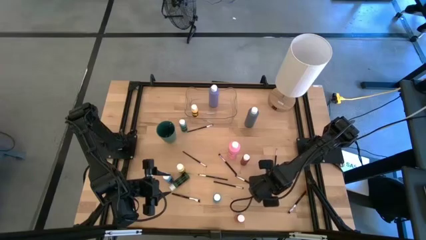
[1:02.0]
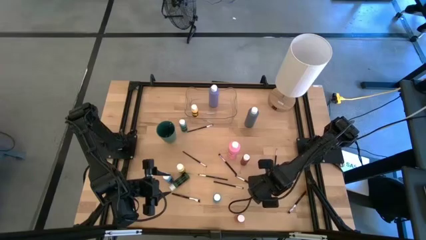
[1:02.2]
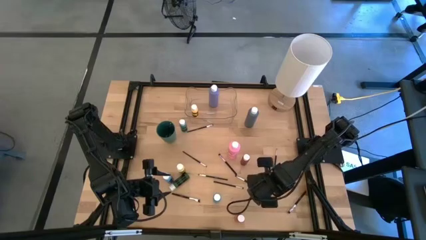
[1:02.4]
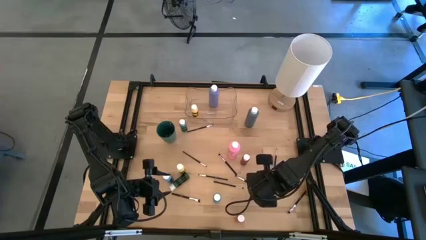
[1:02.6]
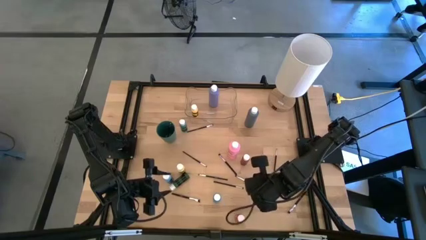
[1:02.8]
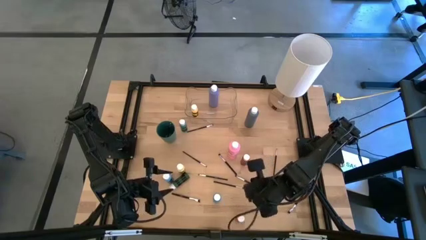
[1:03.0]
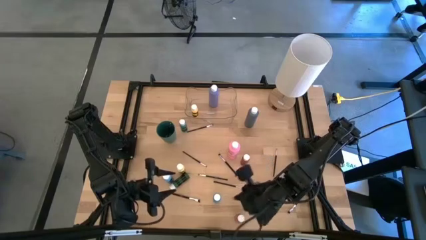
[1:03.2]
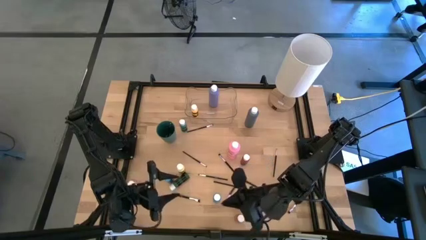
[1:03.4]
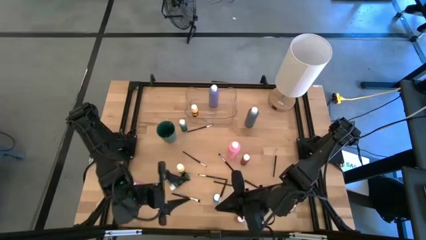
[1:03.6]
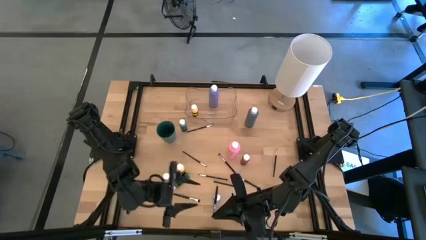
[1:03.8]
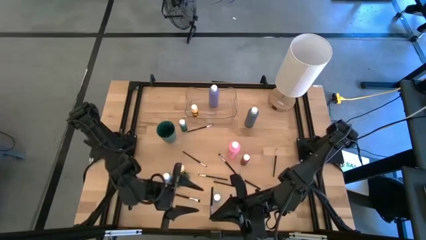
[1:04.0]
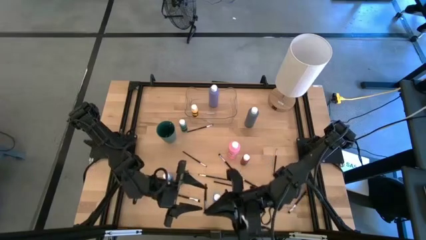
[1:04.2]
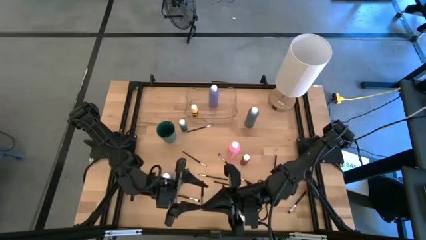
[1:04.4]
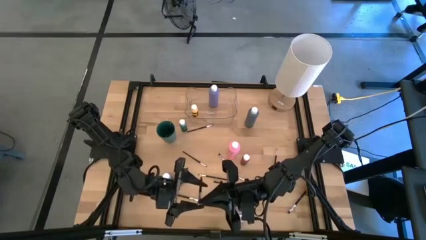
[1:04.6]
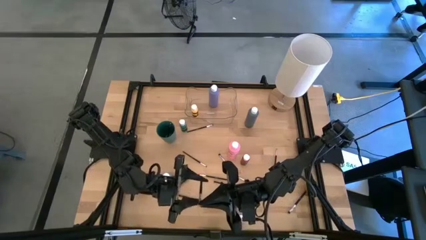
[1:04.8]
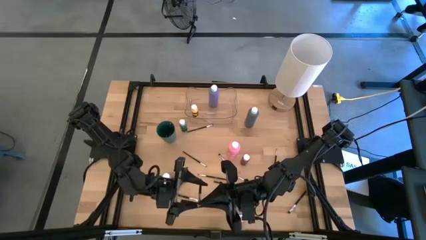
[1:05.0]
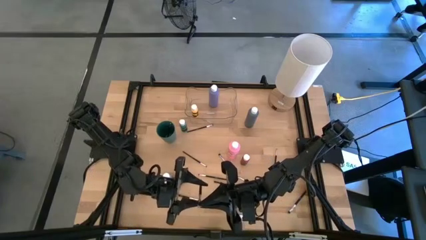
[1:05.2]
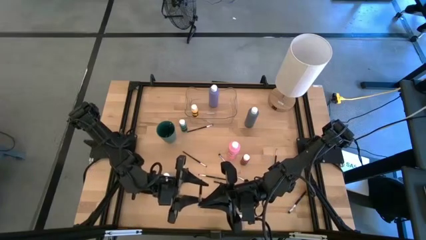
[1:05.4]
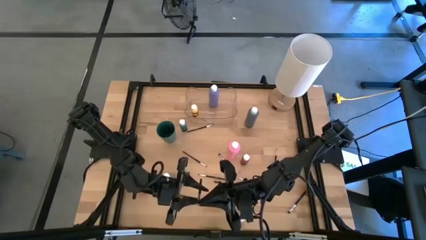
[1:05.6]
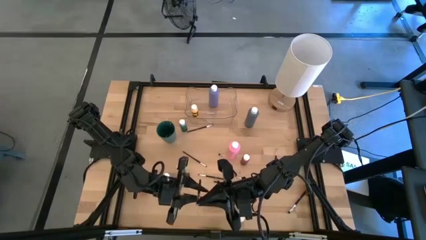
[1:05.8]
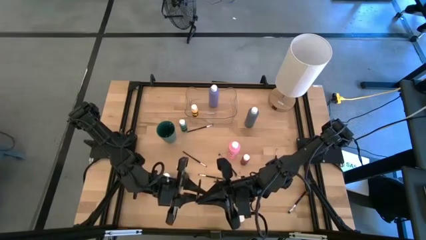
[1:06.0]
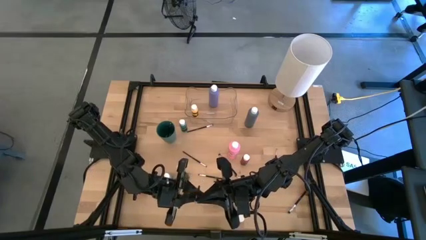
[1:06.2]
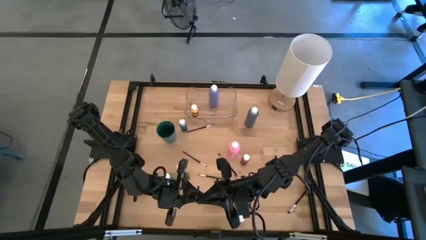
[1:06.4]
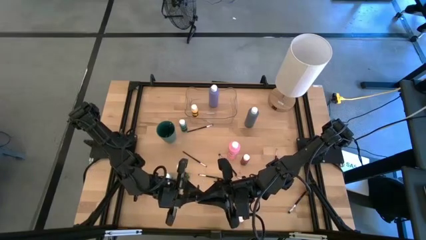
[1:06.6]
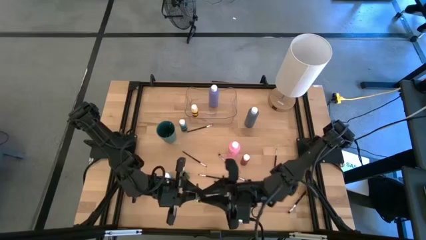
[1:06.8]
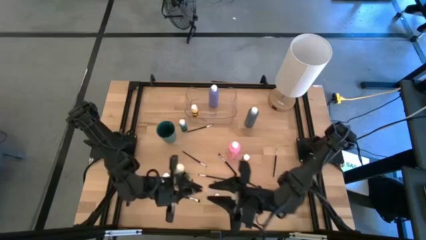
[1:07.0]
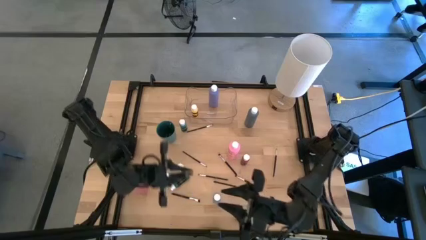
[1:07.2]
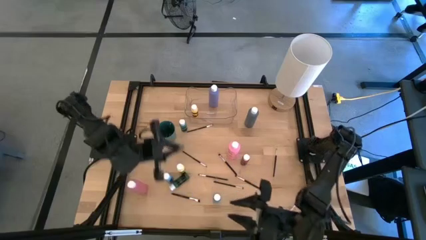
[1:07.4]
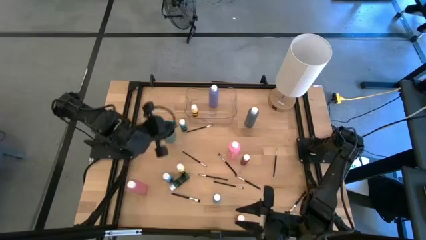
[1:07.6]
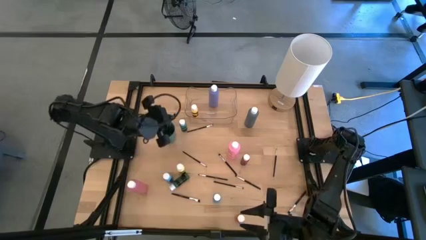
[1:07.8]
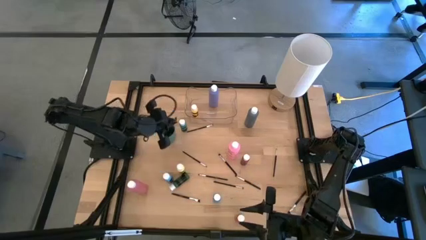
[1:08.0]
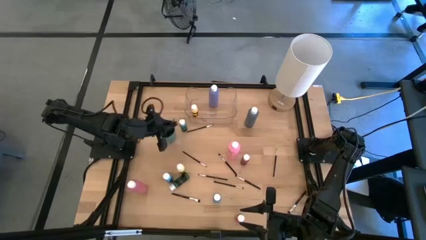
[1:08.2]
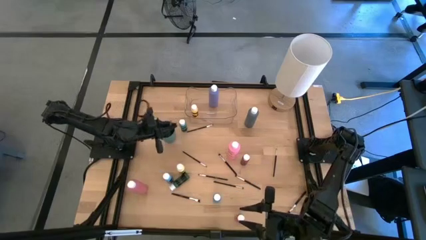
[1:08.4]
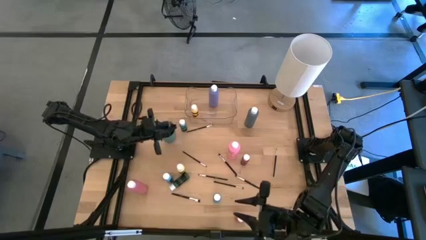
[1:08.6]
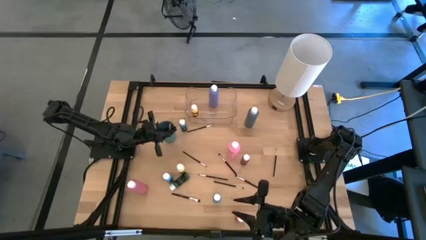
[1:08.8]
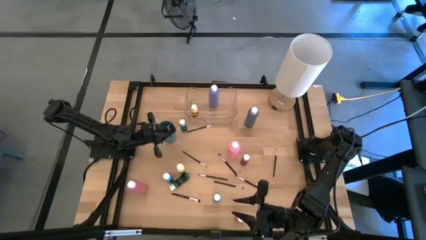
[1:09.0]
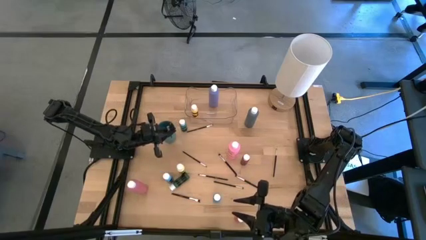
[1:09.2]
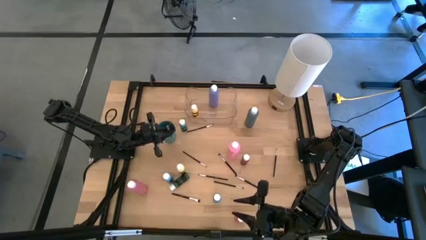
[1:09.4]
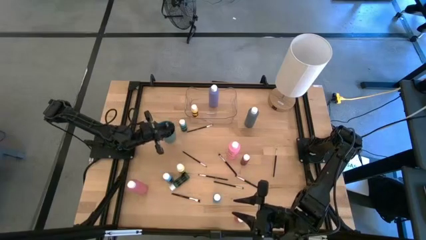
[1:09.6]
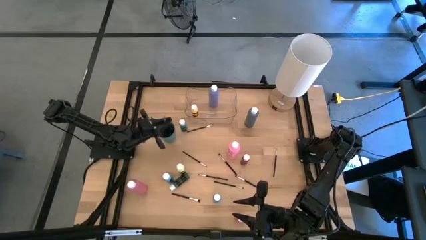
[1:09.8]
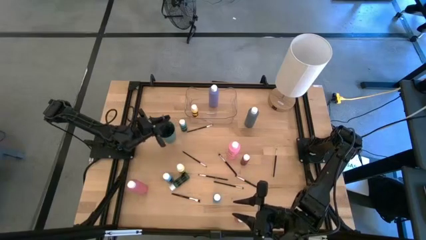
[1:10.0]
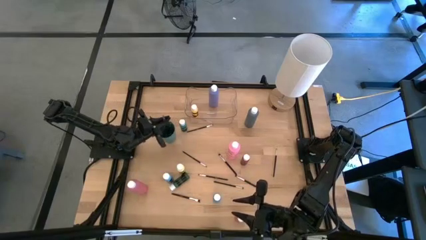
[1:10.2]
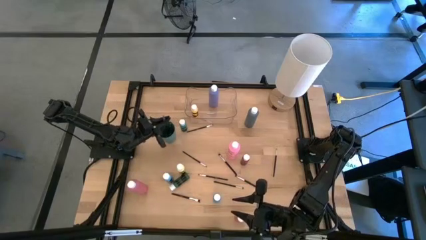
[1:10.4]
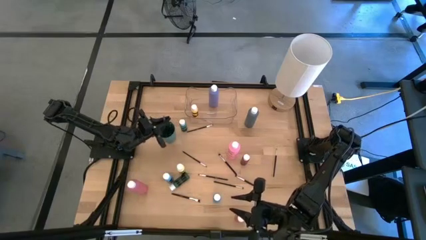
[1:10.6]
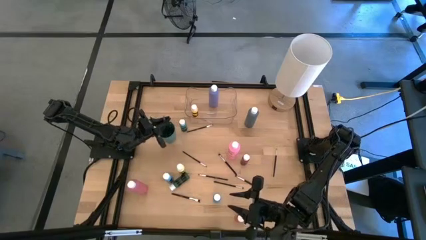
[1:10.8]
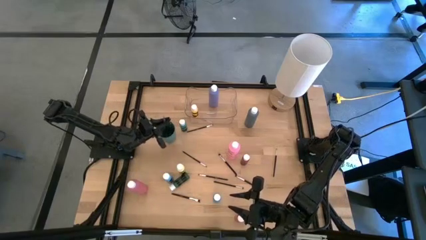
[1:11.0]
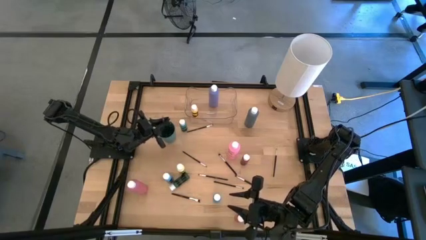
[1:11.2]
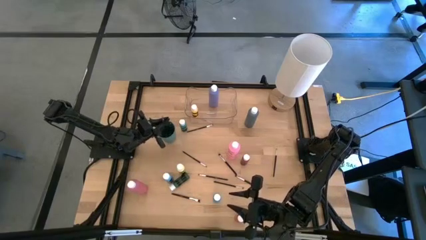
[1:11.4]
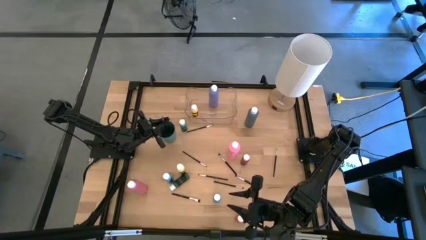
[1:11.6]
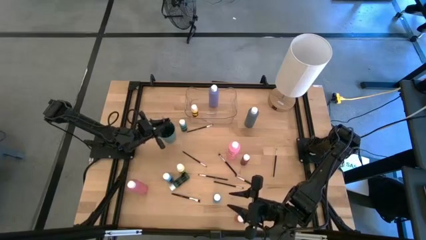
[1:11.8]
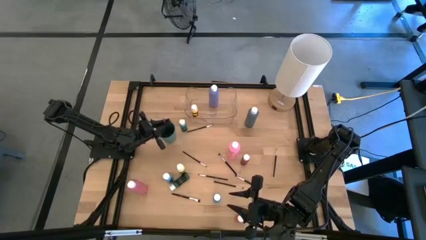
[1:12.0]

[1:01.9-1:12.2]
Task: Pick & Place Paint Supplies
Put the black paint brush into the green cup

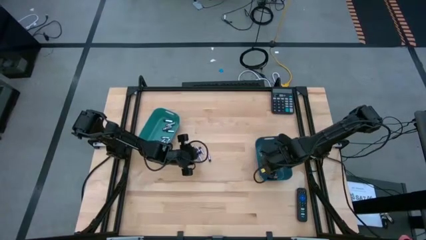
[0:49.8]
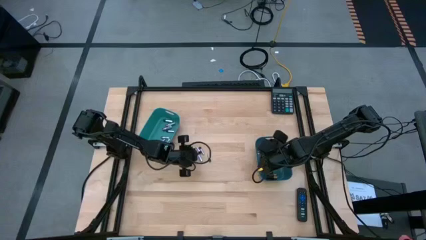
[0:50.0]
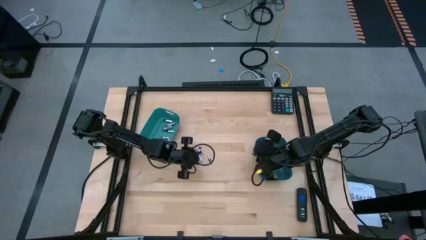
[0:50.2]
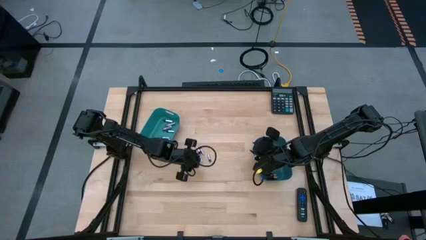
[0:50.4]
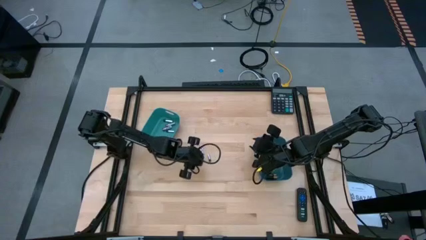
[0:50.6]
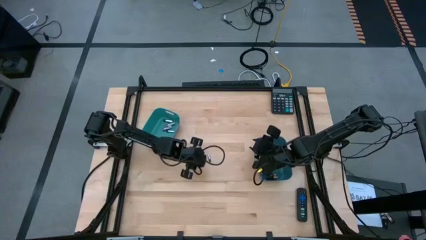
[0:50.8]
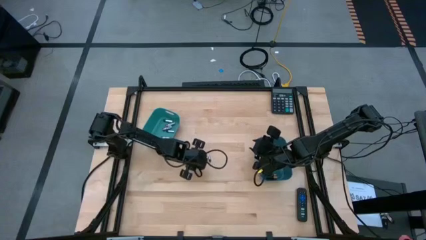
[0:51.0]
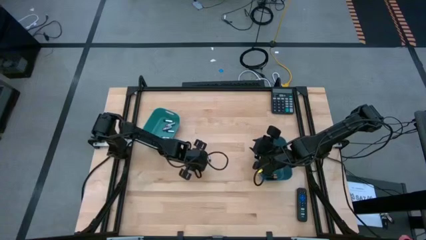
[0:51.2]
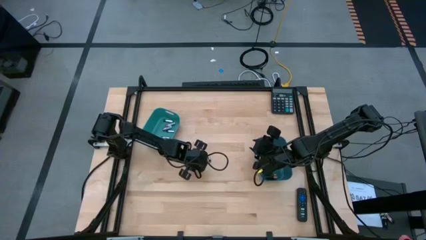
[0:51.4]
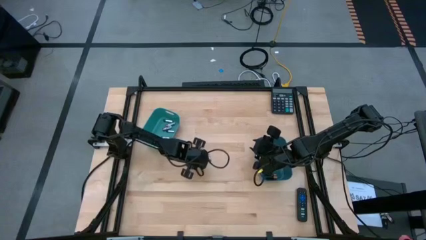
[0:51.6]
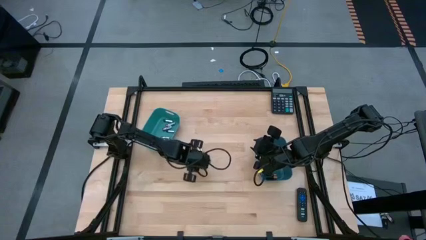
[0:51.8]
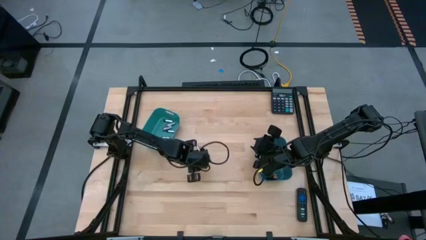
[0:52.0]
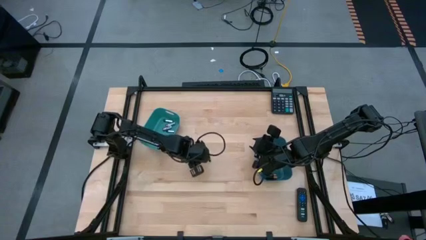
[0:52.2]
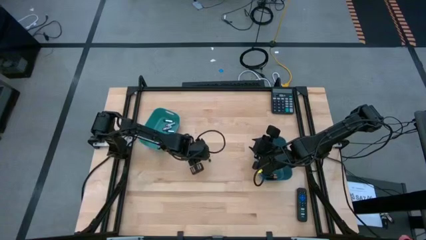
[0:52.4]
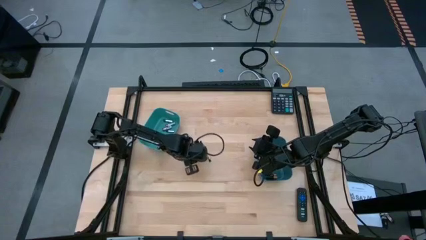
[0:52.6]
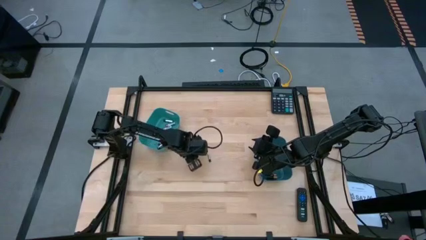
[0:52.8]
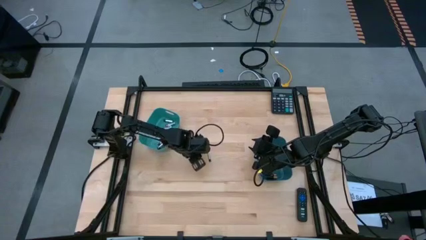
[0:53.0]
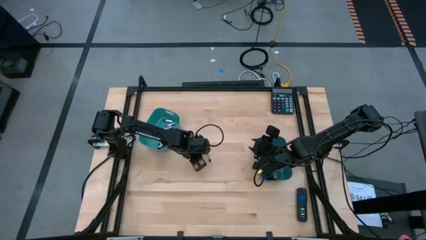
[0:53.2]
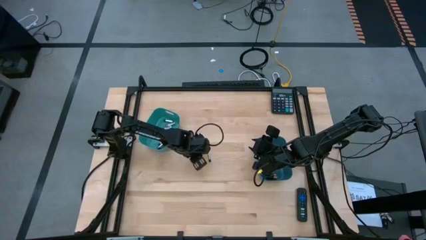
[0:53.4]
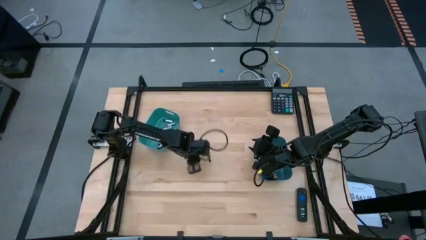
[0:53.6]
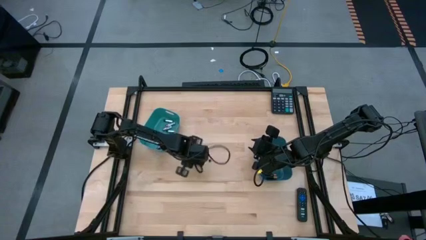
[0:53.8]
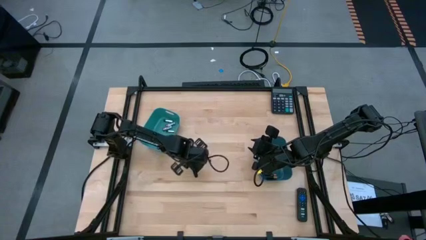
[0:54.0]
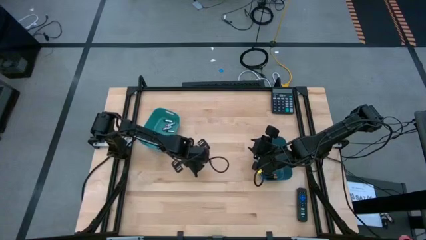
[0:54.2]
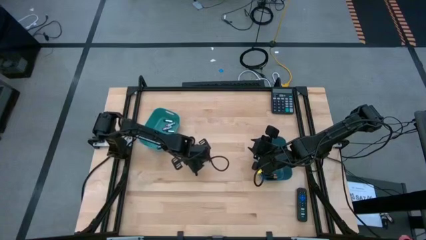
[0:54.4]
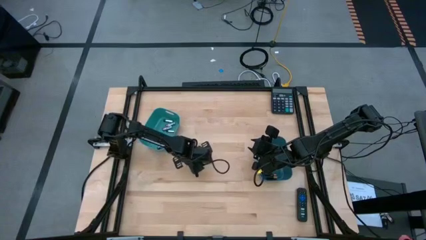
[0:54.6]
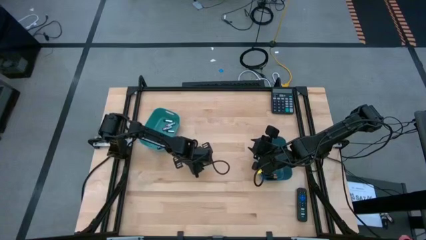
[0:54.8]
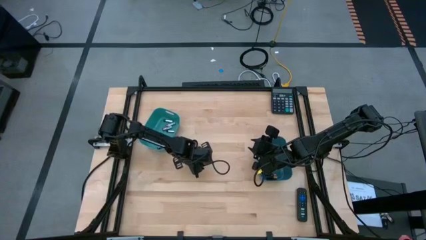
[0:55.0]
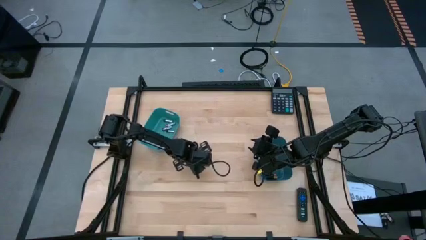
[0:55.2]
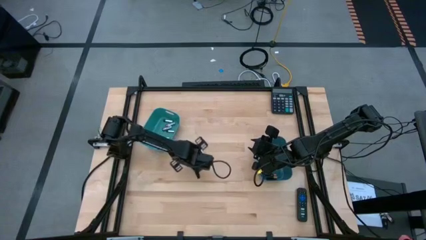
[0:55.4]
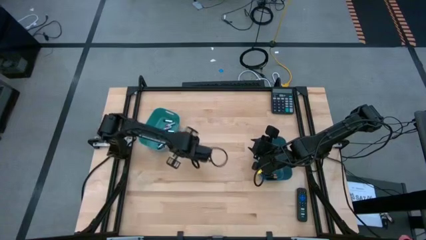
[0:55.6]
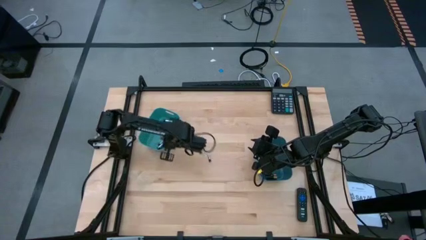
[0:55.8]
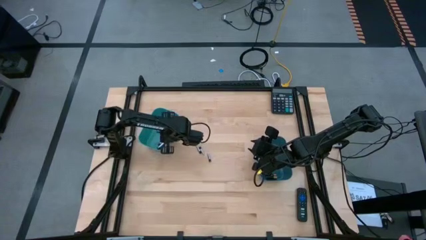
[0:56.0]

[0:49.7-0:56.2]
Task: Sort batteries
Put the silver battery into the green bin

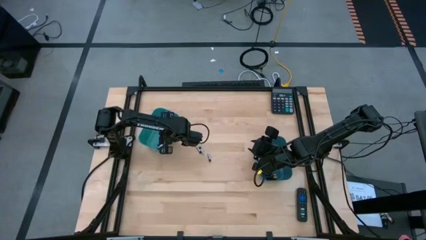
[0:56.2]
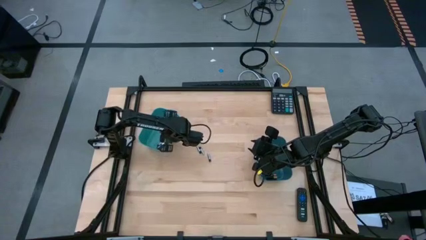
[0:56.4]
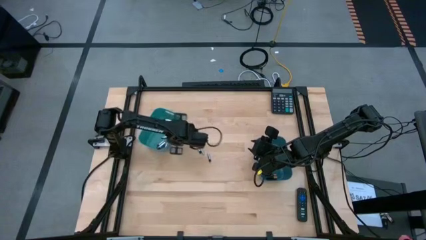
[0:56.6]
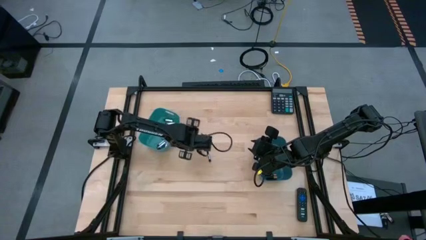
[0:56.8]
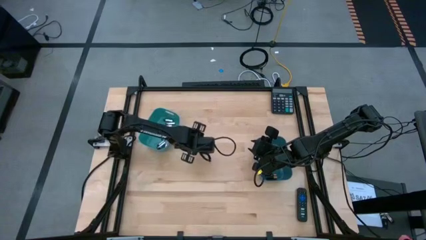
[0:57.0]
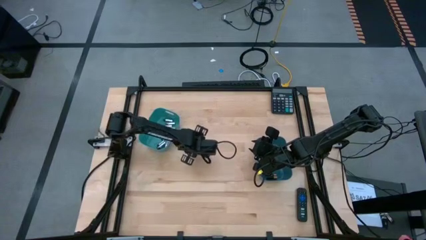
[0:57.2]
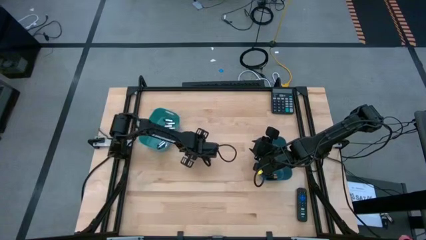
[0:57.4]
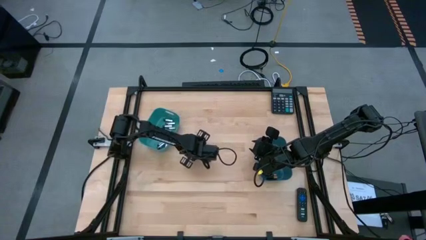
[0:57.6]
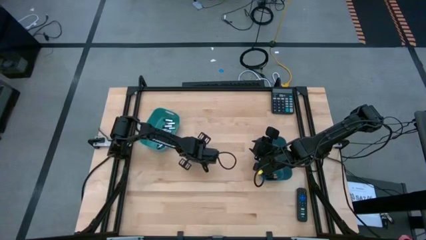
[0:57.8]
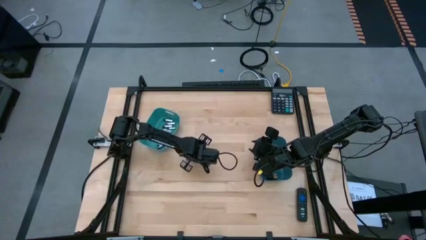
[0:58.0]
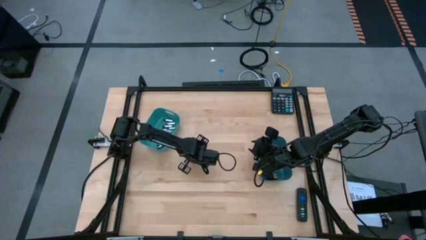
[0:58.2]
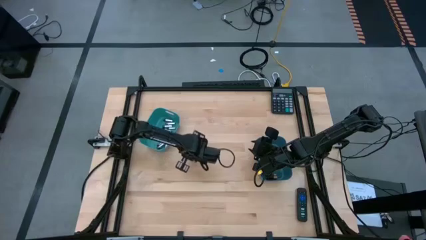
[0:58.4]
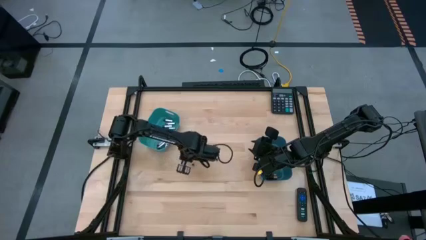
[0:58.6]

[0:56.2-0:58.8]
Put the silver battery into the green bin
